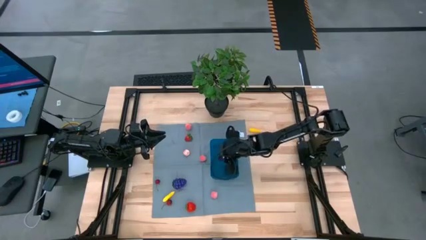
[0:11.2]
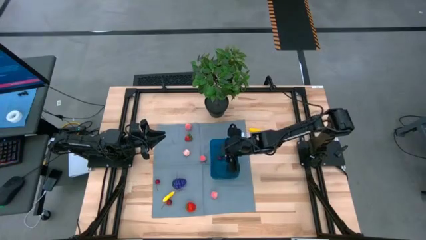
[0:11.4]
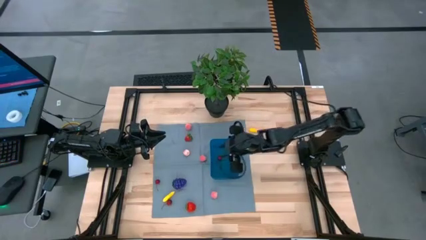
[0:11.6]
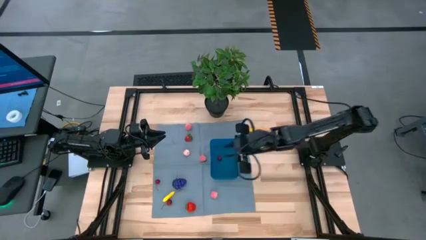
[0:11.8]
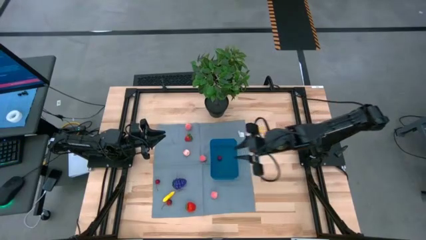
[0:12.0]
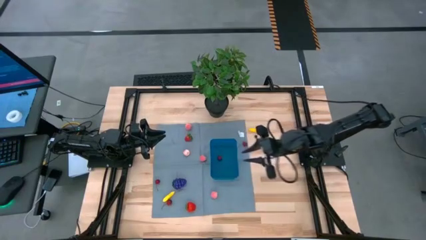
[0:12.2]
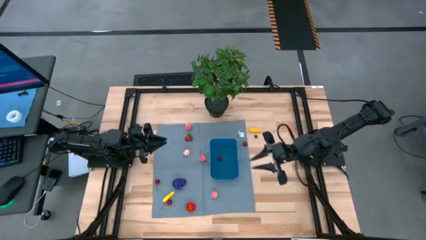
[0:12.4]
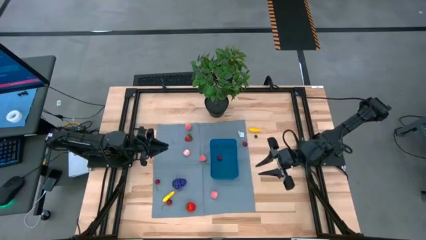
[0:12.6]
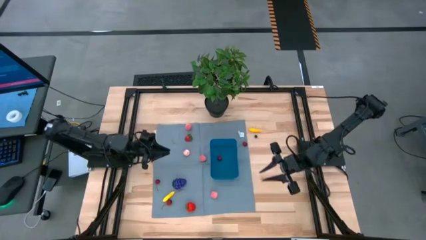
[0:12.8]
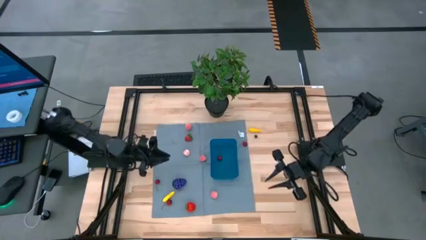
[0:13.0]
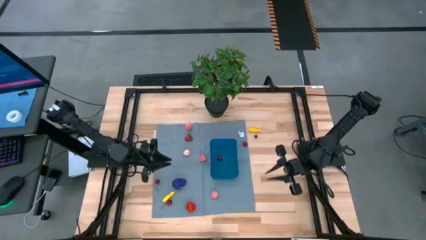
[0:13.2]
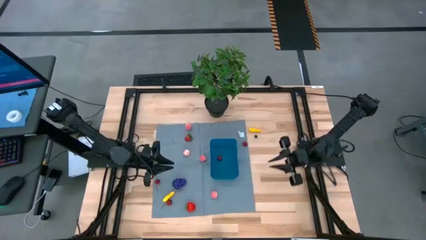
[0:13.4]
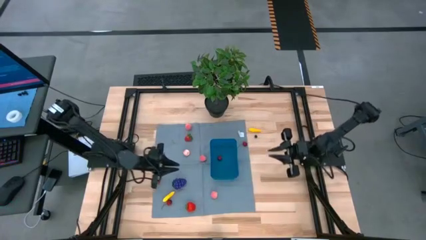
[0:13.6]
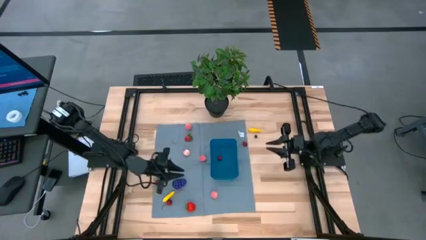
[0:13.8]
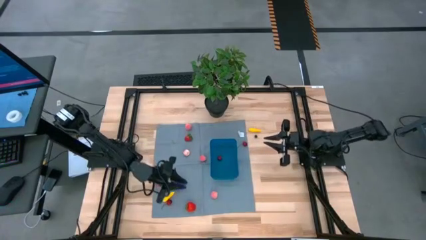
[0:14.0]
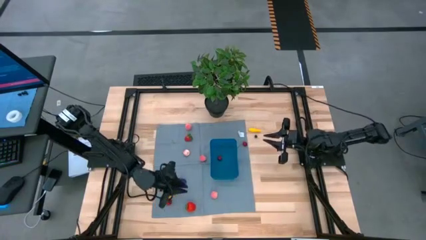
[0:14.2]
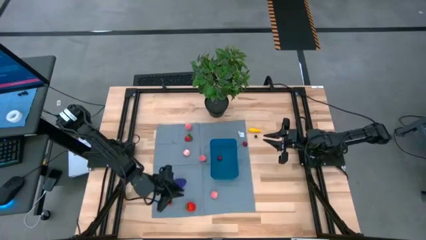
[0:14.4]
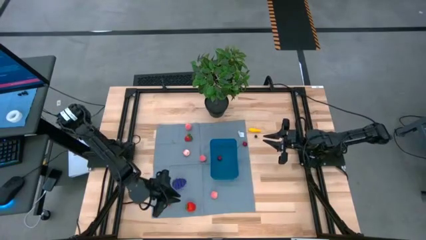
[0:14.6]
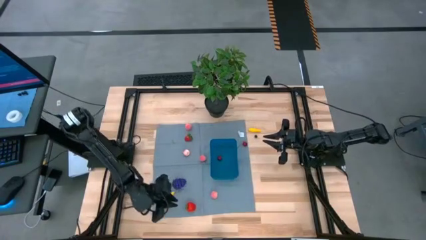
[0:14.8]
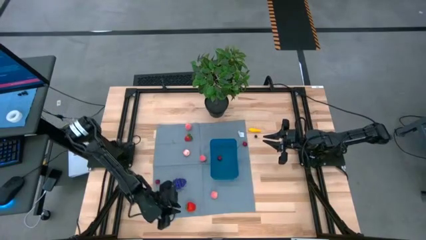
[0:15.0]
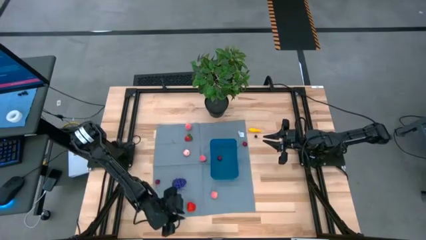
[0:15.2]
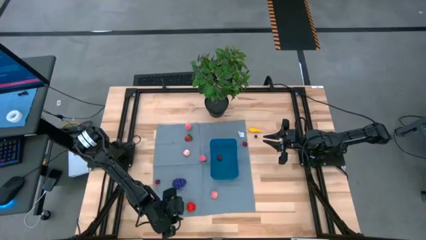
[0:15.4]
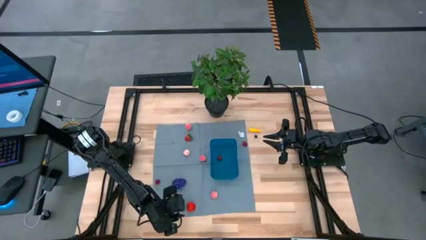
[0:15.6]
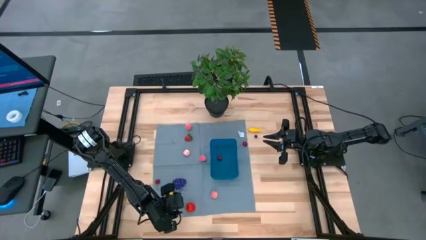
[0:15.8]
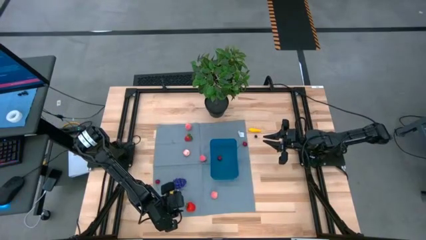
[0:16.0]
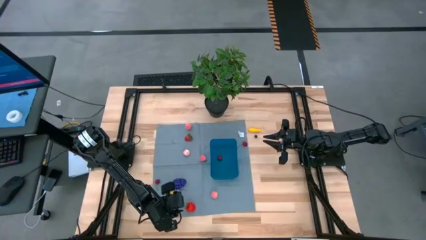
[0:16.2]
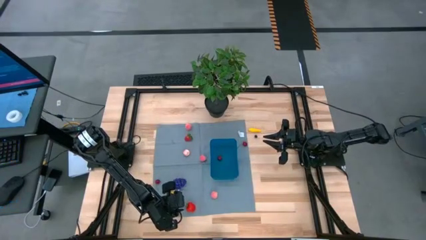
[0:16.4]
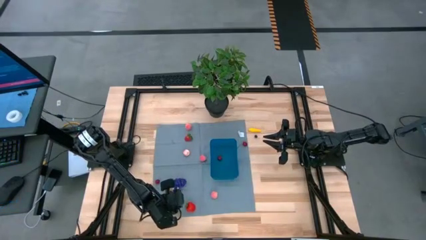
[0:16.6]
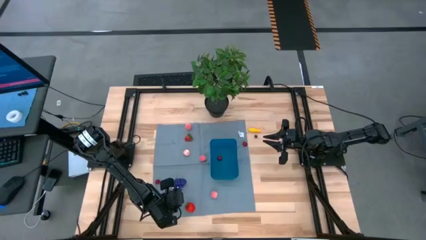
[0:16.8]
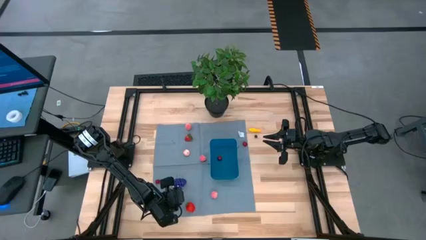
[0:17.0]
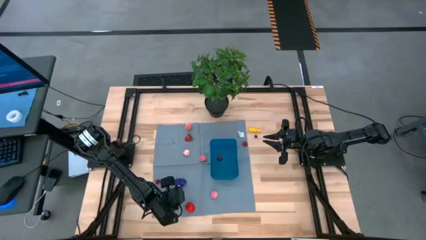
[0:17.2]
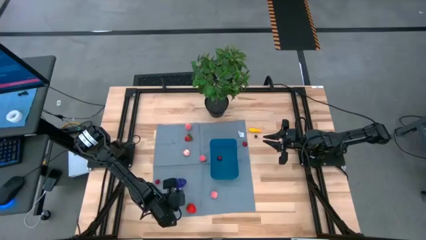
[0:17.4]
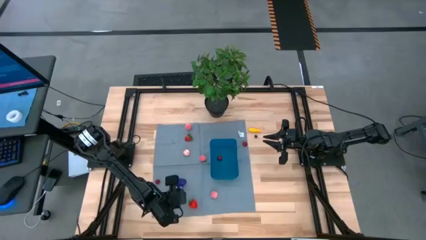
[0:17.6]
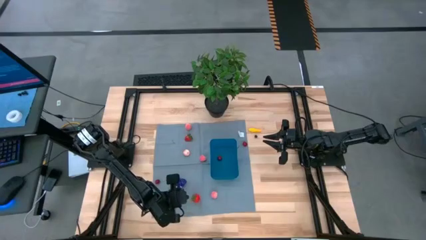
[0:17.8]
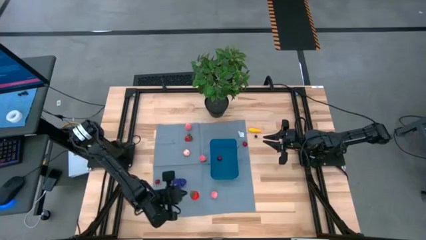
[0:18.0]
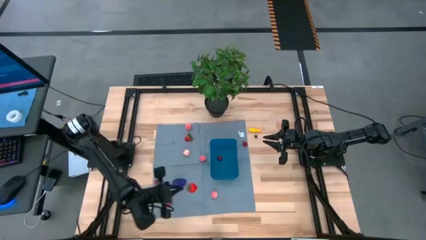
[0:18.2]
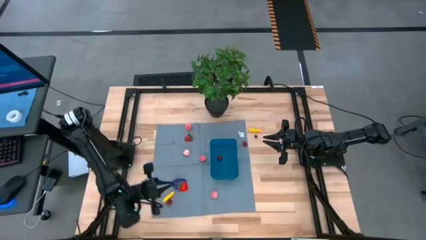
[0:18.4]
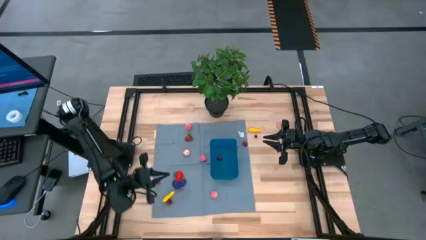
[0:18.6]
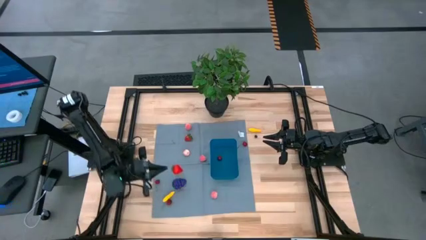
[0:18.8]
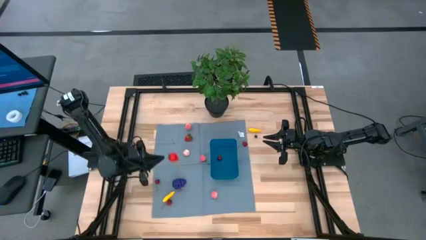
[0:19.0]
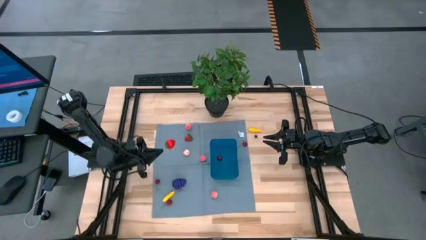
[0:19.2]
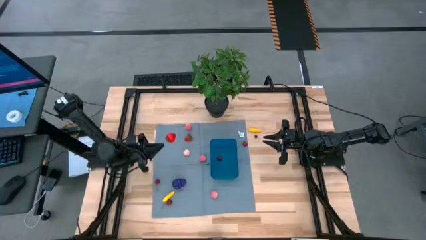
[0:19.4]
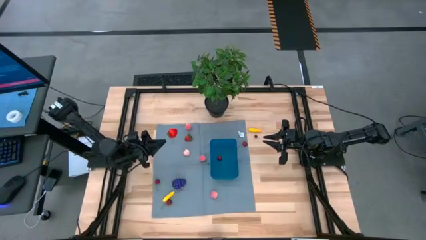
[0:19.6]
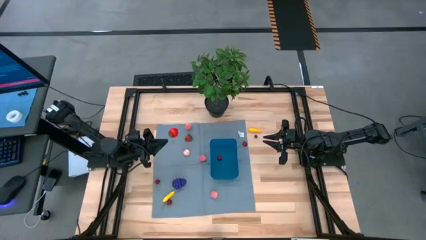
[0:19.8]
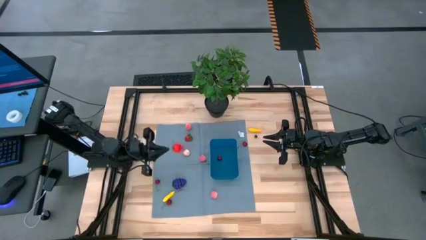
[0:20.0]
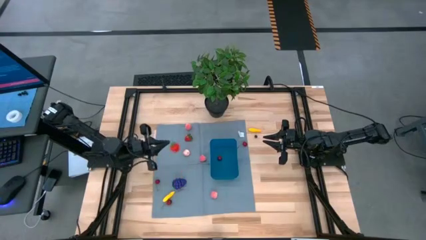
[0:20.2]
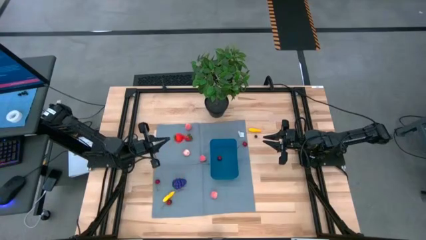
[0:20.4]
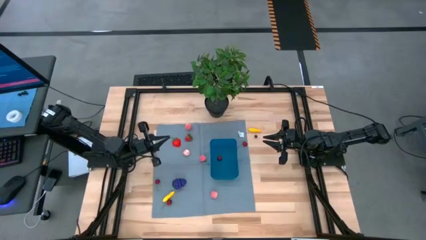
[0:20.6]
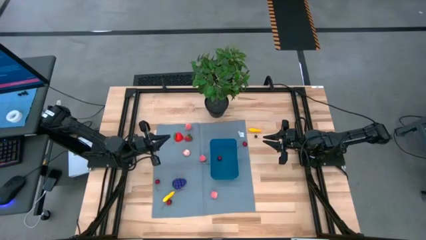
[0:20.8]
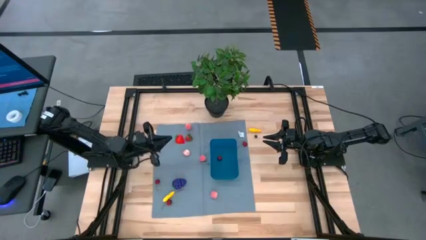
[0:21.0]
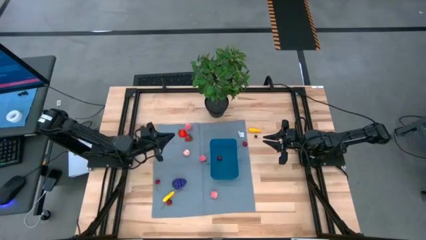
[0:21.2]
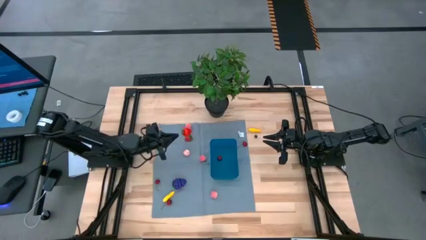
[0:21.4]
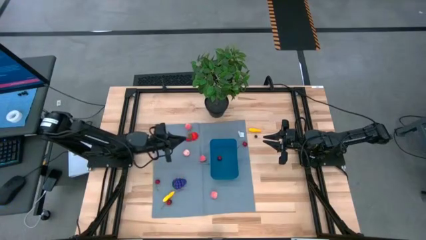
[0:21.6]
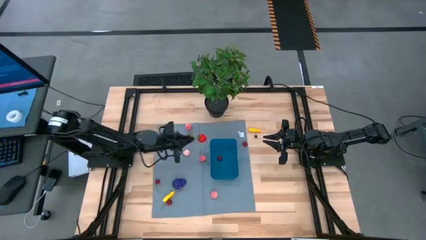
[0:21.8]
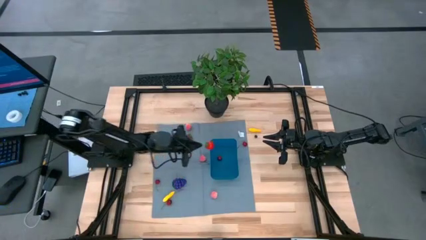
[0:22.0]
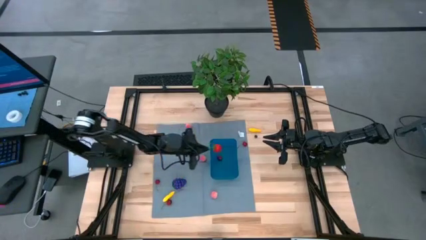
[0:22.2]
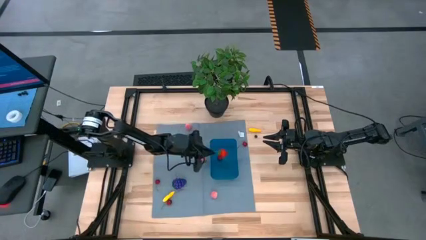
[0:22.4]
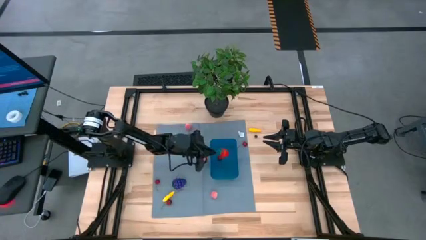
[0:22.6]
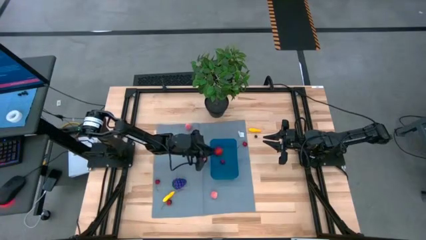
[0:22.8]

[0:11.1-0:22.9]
Task: Pick and placing Produce into tupperware
Put the bottom strawberry into the bin
